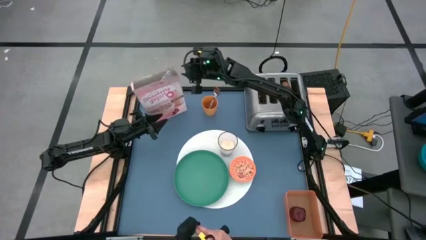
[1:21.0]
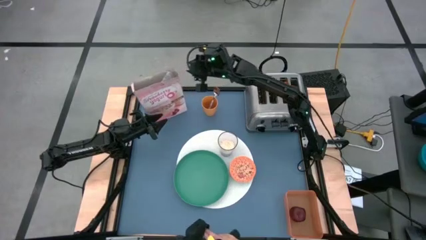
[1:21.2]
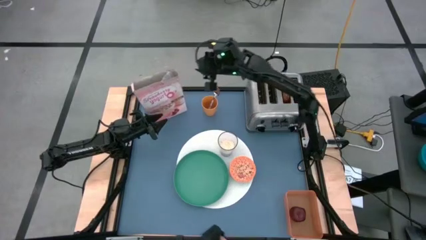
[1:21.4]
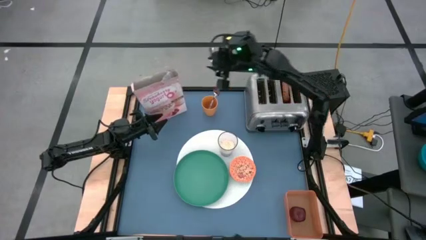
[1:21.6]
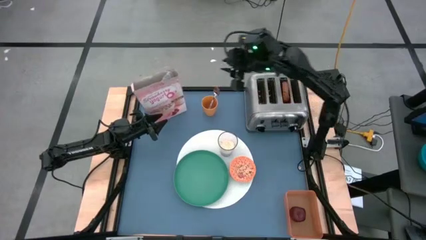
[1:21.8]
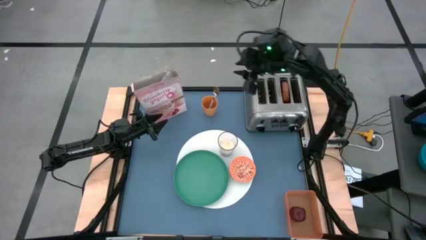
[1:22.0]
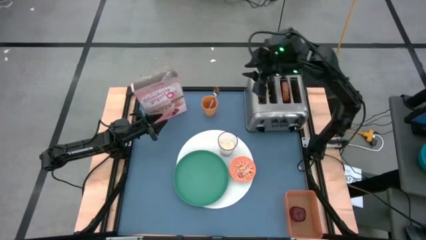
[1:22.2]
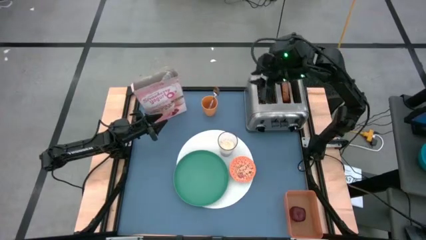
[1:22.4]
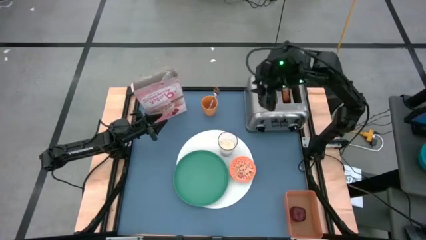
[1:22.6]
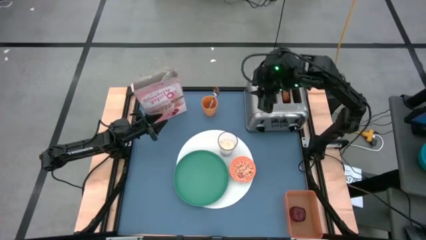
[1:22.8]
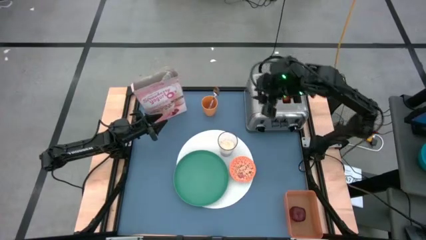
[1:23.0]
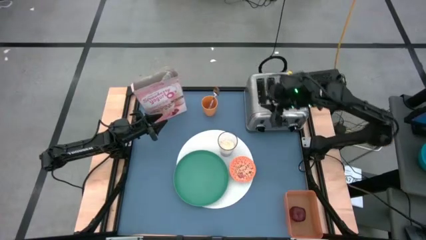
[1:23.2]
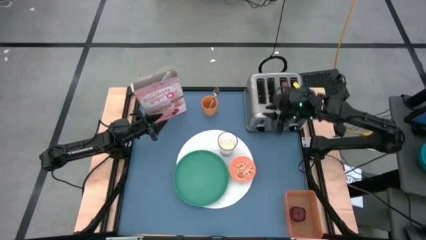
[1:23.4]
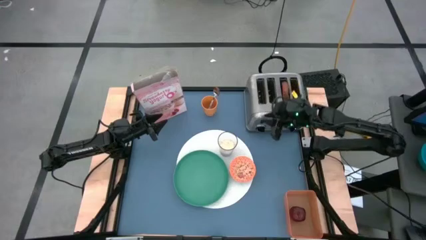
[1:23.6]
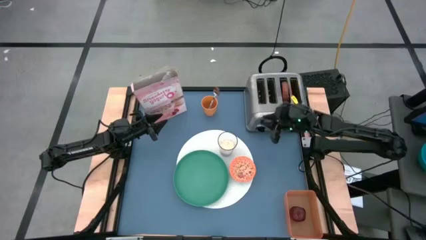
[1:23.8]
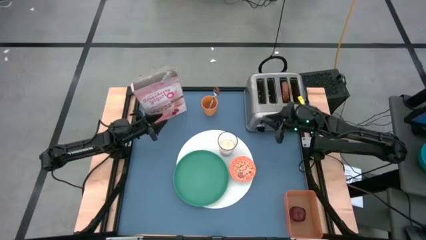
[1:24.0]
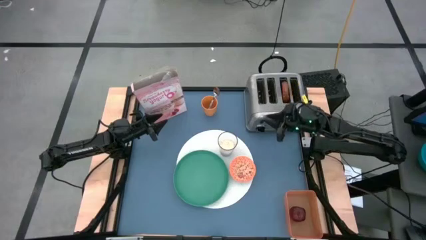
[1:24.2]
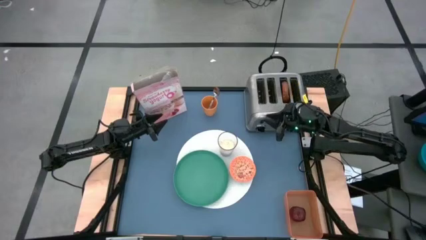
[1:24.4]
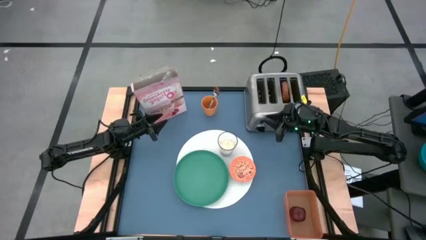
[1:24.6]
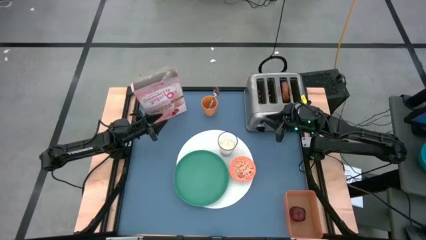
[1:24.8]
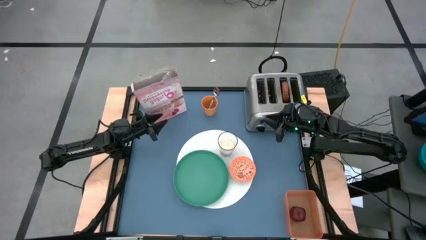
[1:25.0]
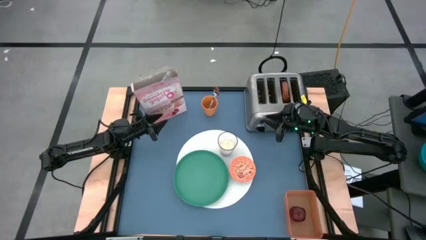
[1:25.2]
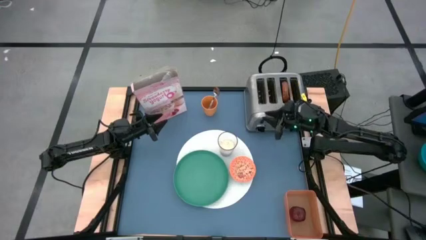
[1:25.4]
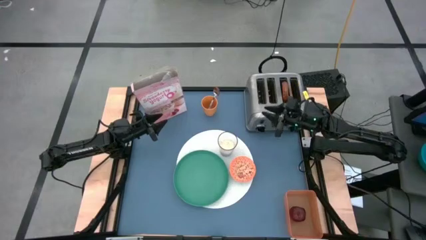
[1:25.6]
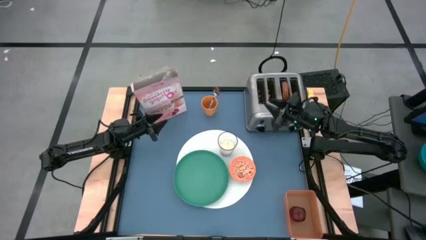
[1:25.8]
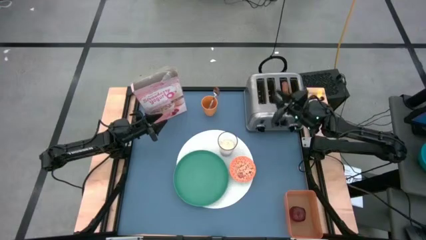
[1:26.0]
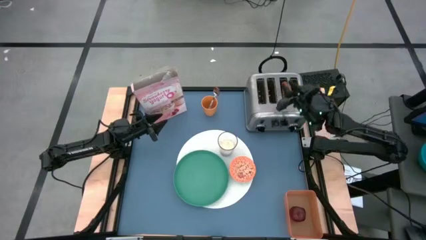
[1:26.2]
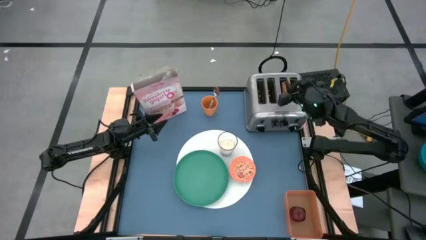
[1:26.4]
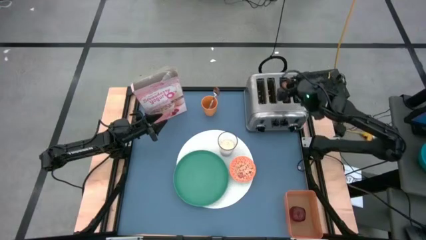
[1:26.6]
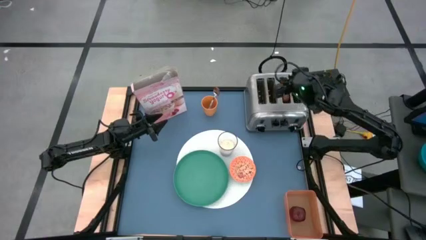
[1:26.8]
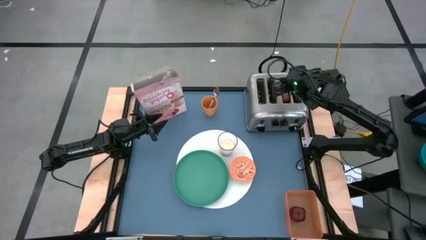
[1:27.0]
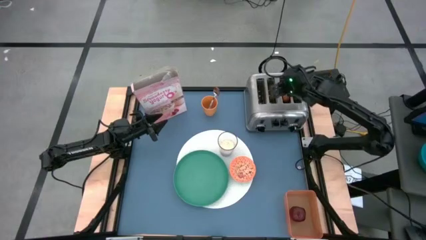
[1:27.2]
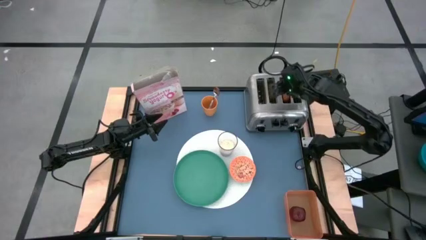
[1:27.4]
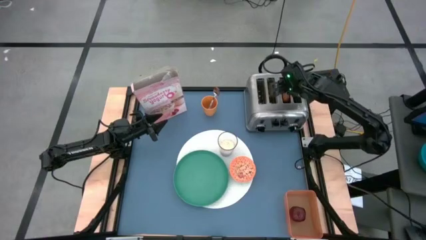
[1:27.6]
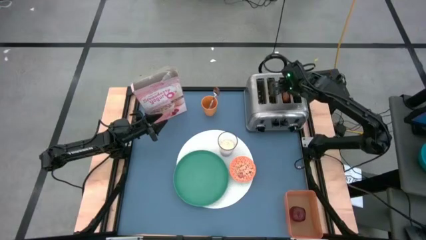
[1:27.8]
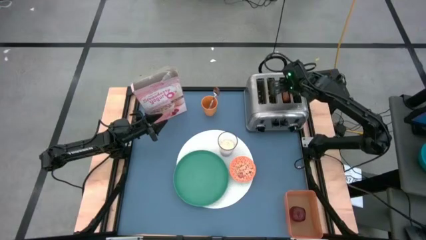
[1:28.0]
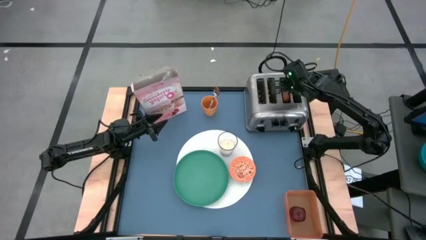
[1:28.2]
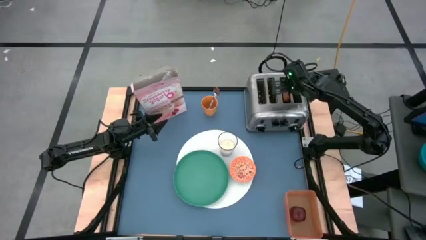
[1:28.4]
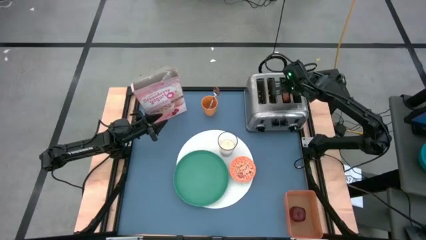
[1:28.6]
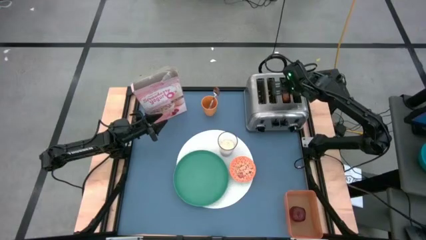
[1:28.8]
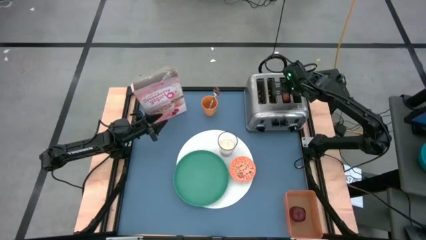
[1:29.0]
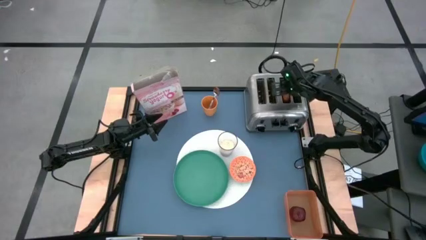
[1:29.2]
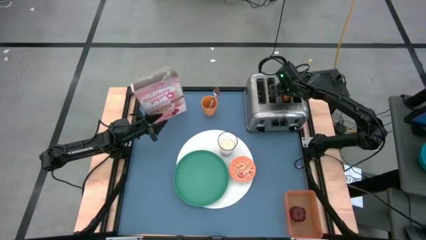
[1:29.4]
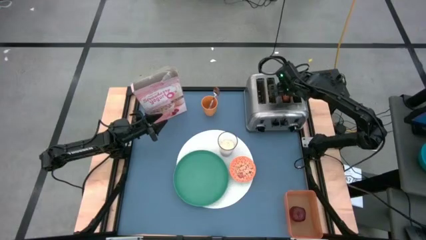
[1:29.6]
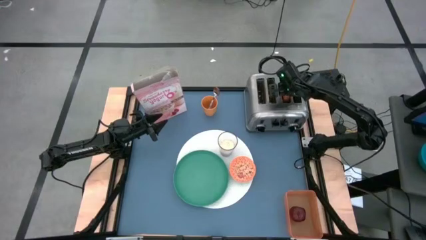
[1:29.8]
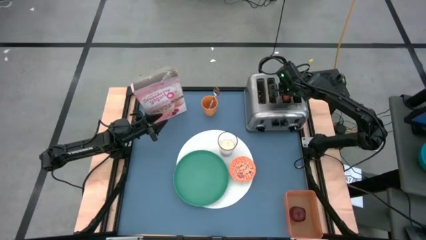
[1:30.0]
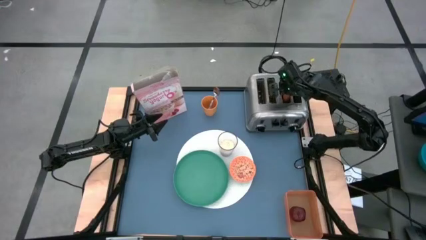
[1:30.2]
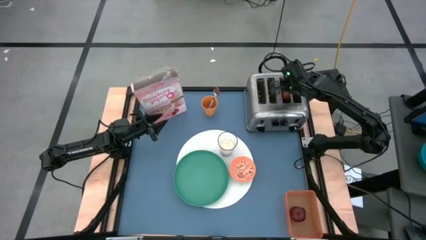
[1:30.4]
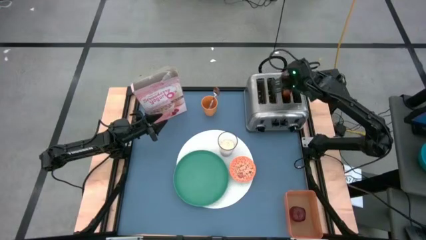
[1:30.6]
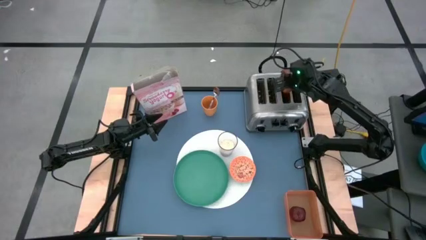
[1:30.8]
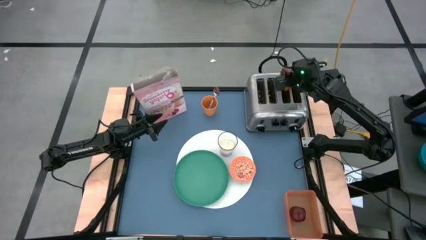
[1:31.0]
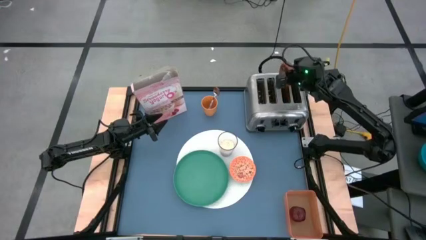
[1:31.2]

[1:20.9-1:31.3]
Task: Arrange a breakfast setting
Put the bagel from the toaster on the green plate

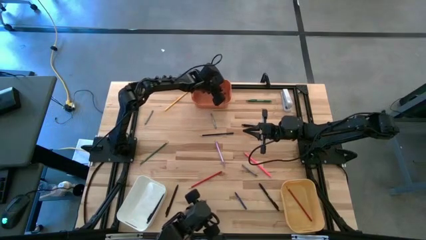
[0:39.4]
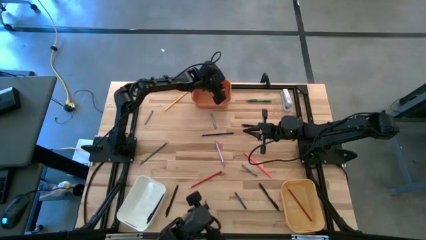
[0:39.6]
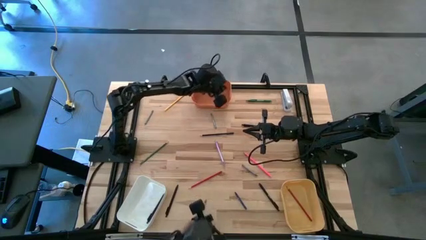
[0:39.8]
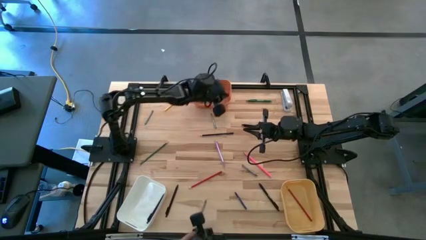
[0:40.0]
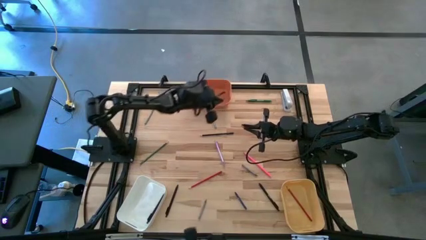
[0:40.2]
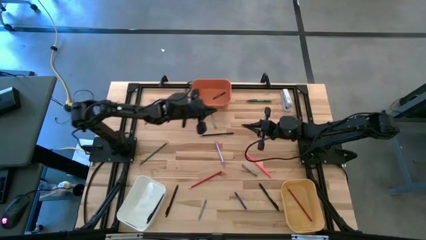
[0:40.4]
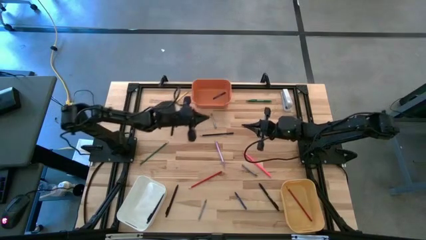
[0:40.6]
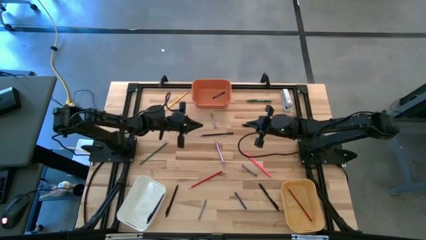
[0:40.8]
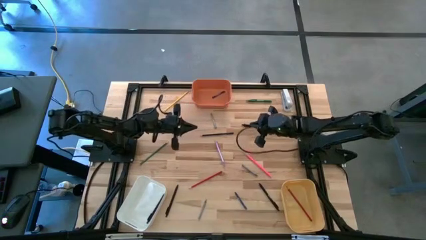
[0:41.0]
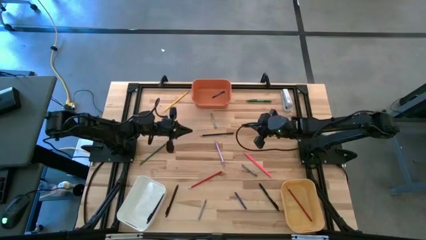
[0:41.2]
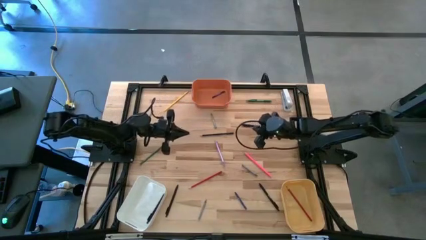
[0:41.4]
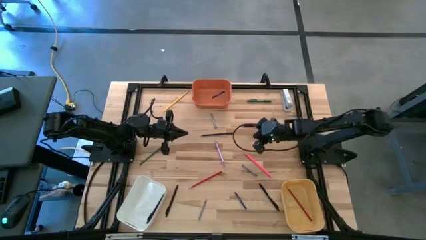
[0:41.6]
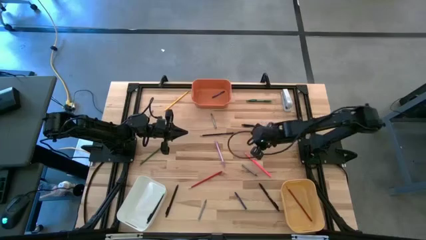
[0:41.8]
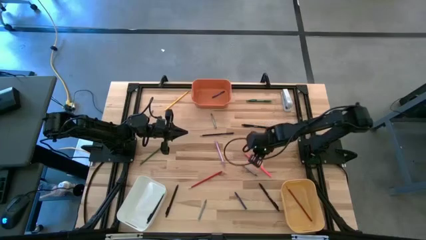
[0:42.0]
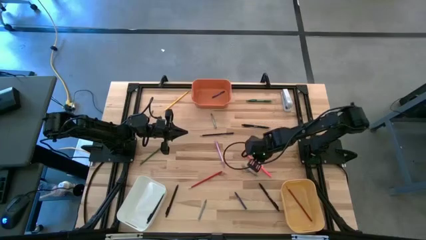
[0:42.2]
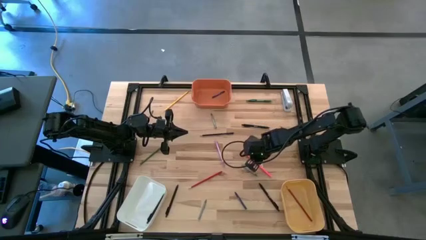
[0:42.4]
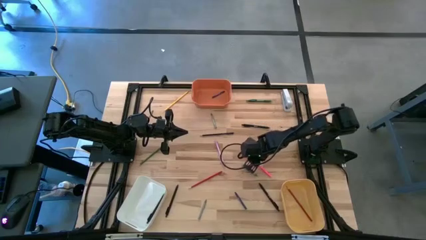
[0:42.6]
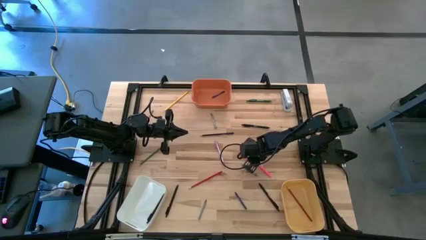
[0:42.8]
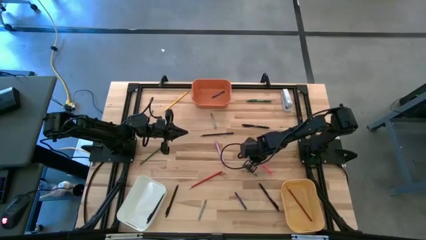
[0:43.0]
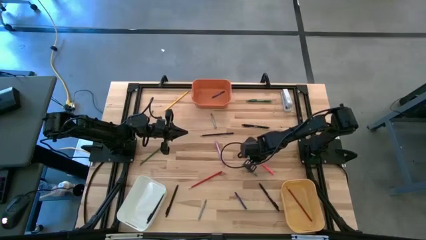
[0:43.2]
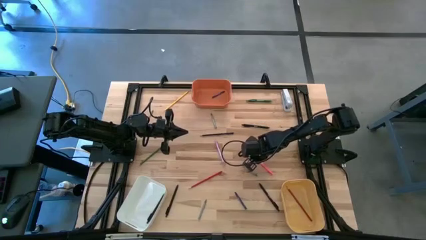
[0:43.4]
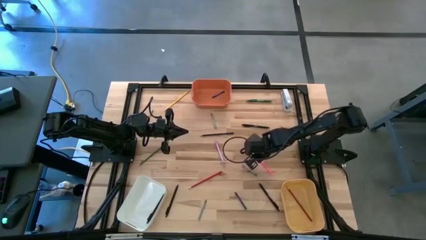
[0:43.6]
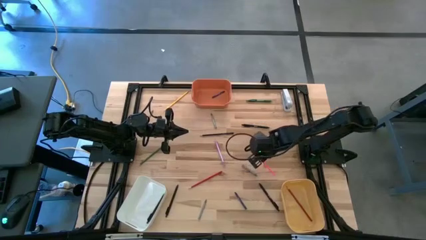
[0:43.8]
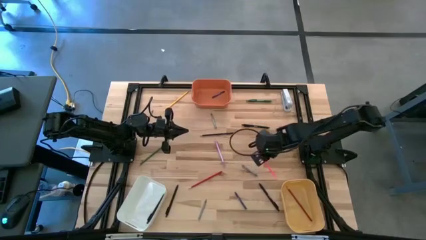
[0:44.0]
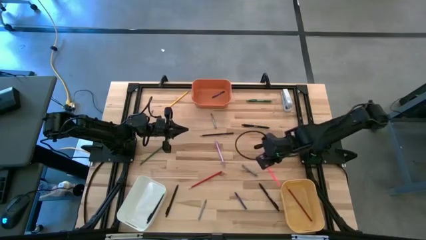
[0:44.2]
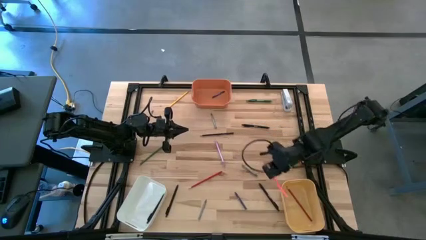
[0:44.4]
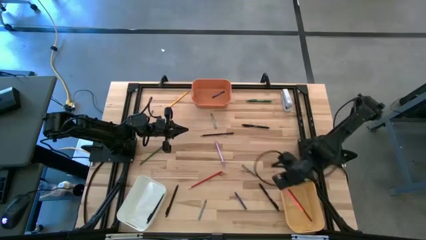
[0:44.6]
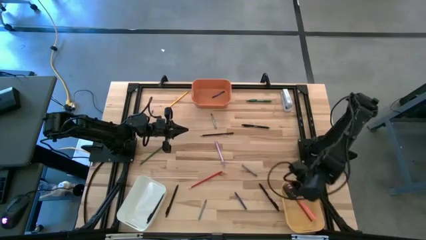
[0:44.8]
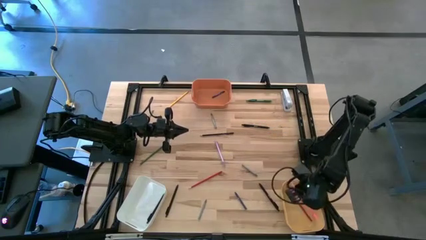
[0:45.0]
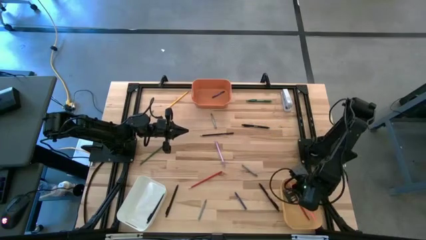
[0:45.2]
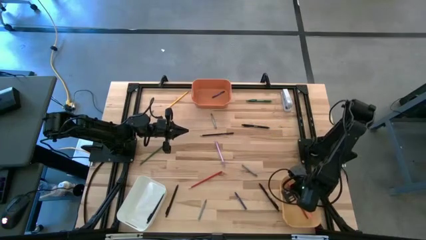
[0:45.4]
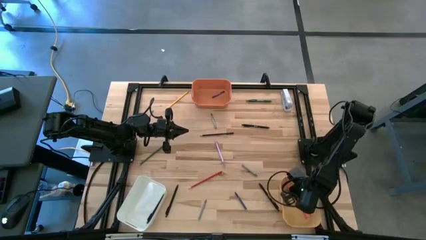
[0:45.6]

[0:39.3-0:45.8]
Task: Sort crayons/erasers/pens/pencils in bins
Put the pink pencil into the yellow bin
